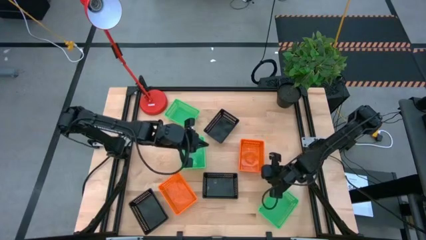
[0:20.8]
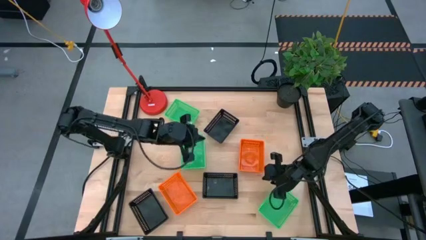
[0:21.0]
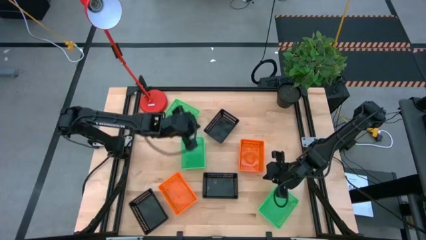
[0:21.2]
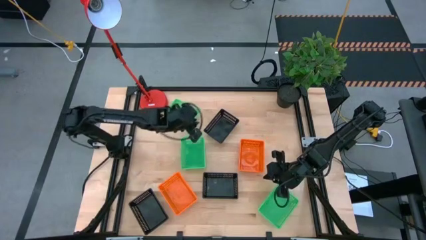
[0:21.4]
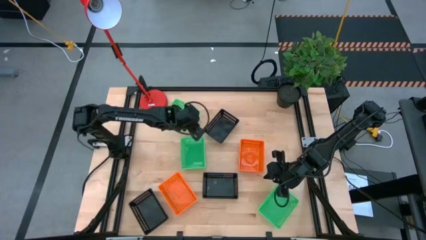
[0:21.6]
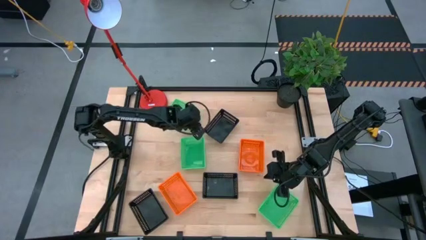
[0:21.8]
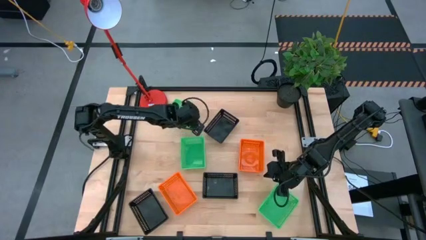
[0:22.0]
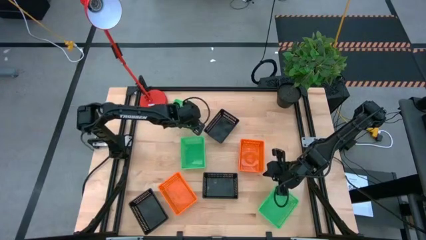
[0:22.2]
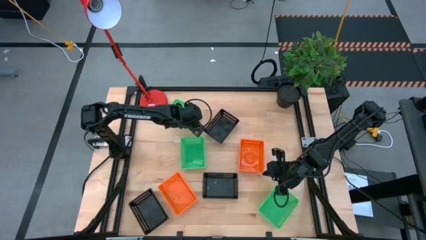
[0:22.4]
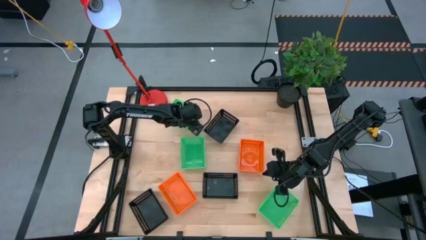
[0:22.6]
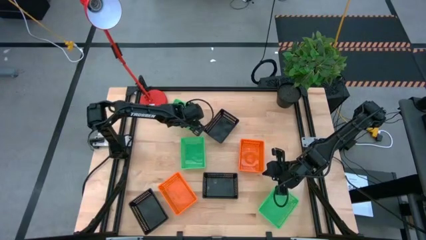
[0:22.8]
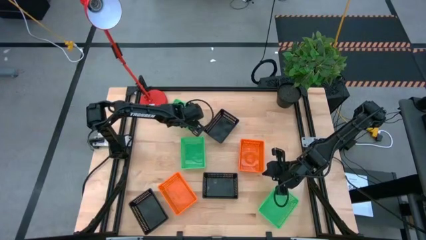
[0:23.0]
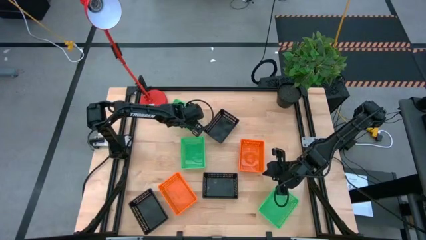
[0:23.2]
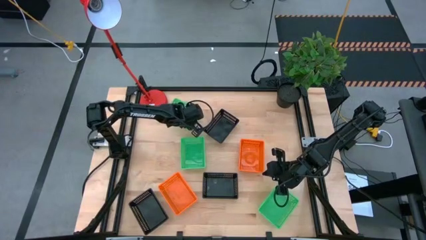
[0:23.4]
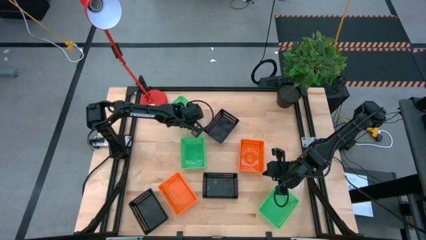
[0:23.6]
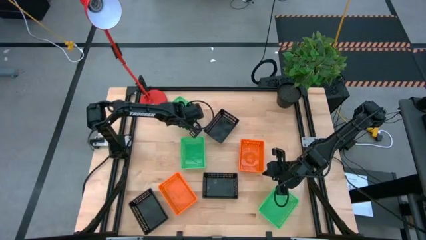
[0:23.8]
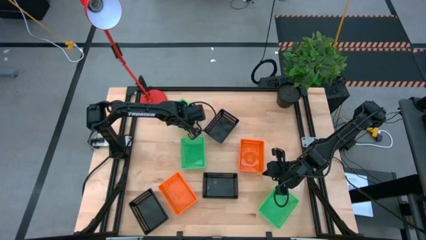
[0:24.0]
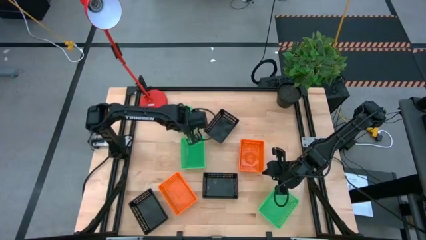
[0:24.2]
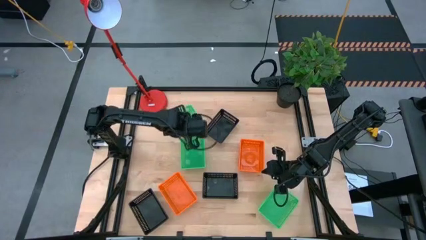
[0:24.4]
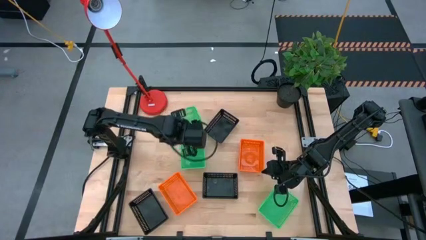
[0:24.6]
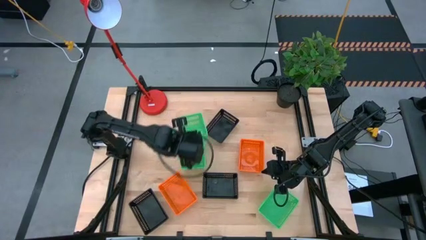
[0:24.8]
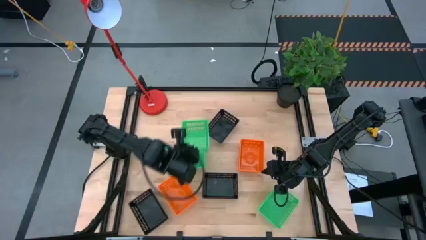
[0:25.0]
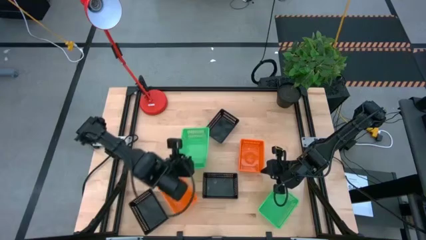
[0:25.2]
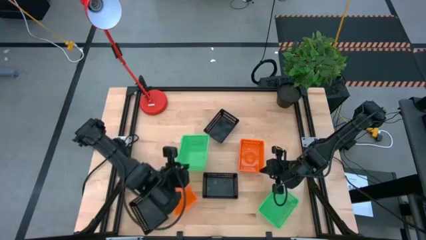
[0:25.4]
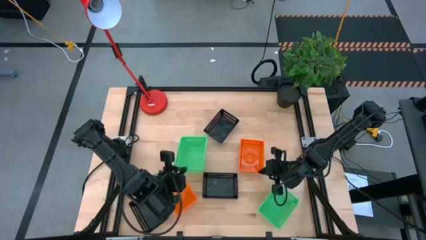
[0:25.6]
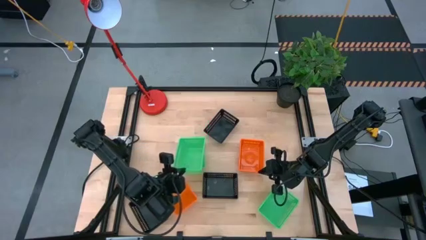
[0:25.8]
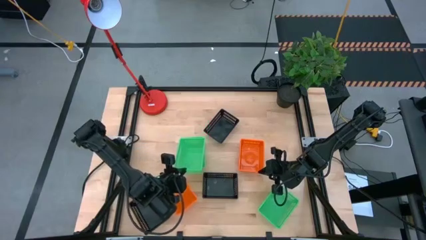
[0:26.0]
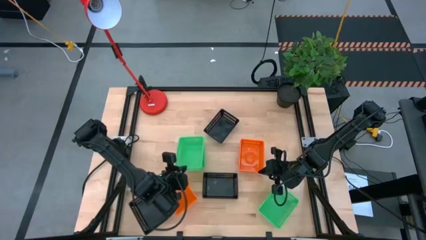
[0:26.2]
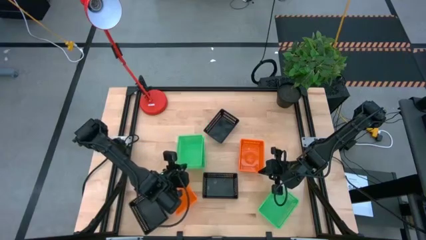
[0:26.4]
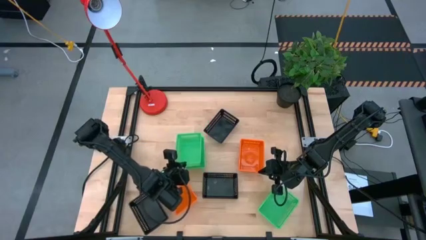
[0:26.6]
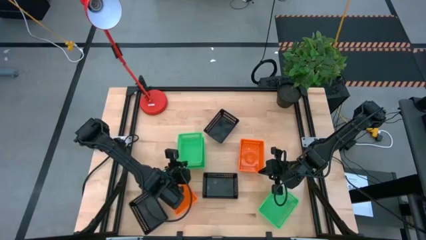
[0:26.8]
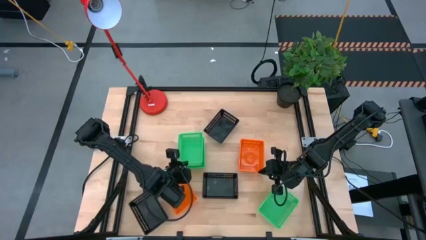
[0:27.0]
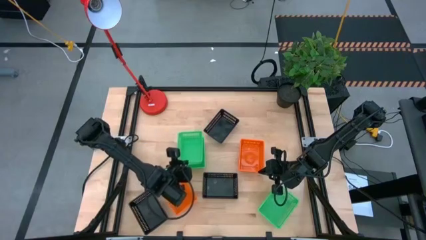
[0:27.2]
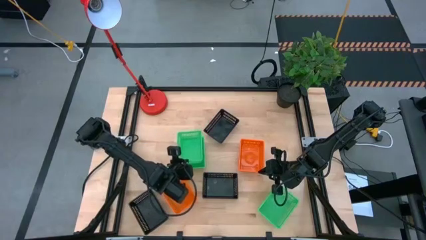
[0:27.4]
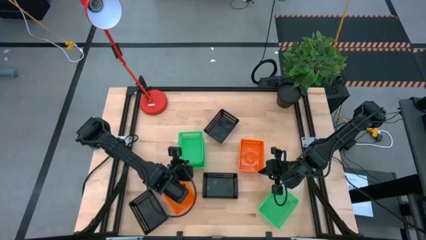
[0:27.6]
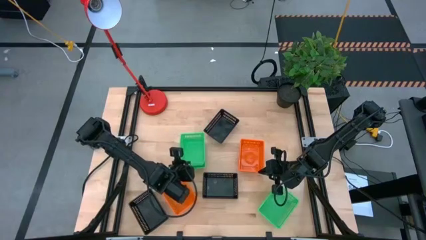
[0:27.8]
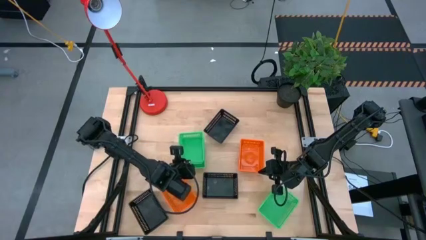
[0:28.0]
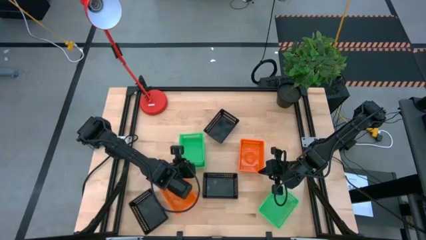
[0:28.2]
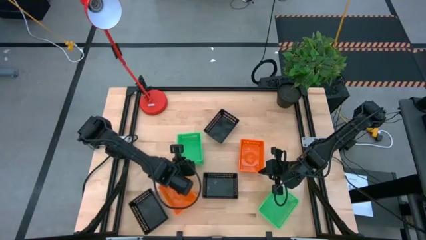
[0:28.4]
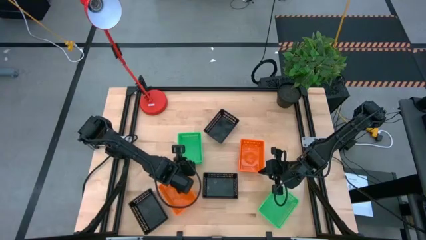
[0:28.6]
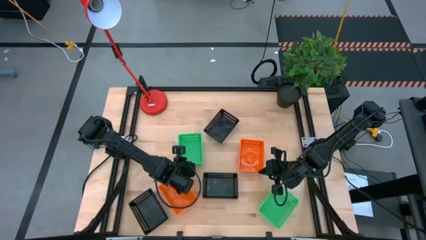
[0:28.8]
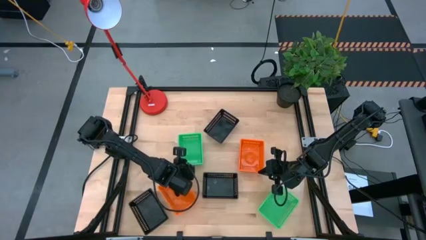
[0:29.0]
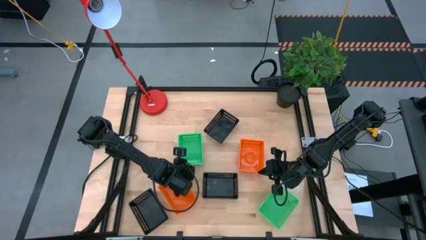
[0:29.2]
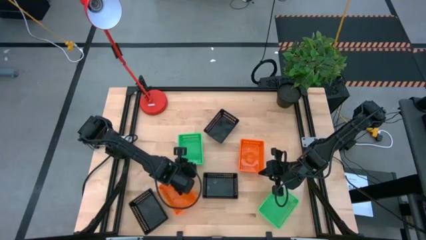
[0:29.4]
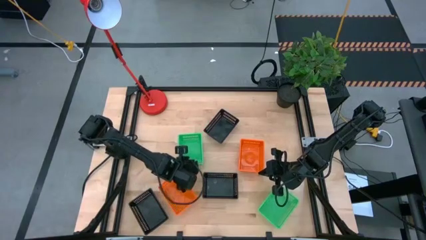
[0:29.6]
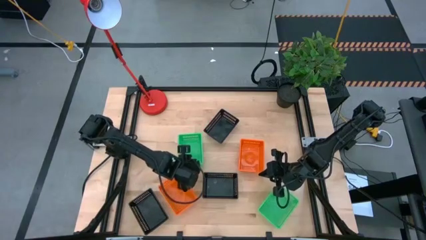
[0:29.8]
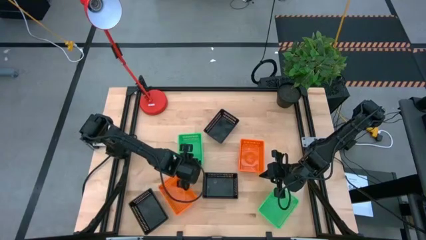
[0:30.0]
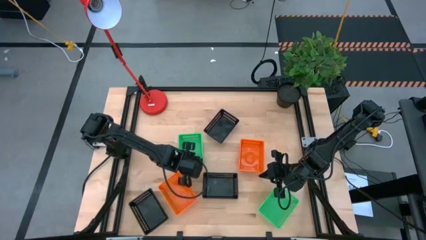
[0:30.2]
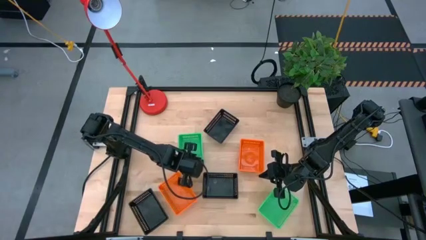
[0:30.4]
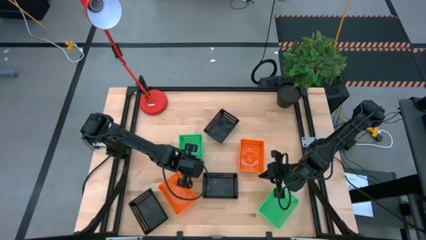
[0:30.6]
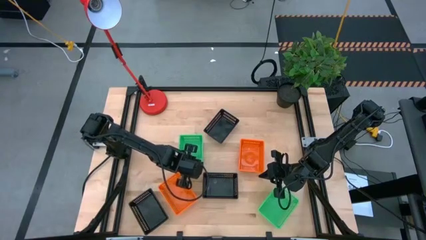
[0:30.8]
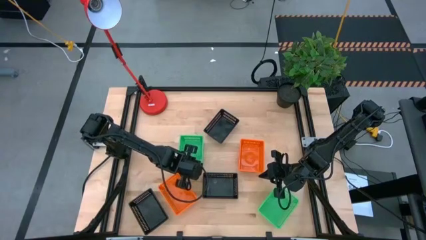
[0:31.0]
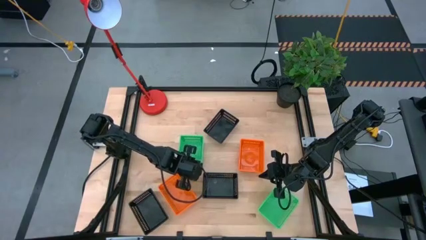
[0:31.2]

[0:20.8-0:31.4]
Stack the top green bin on top of the middle green bin

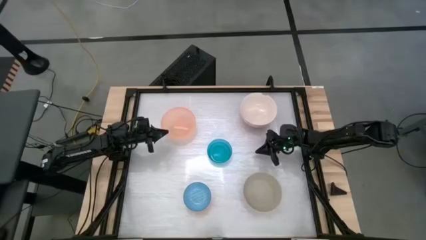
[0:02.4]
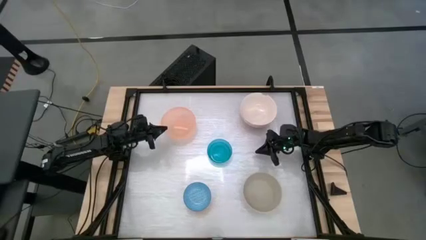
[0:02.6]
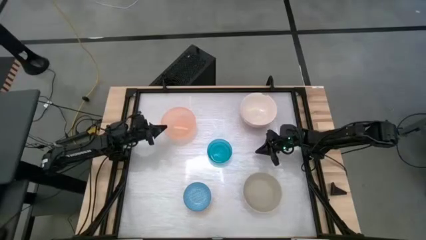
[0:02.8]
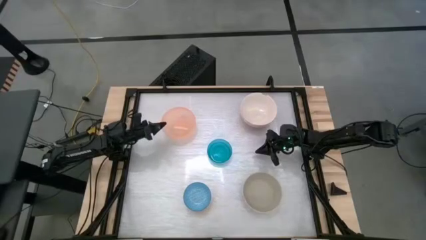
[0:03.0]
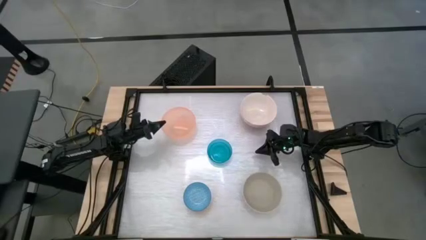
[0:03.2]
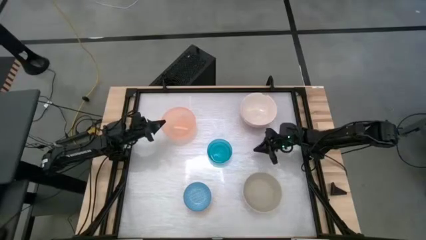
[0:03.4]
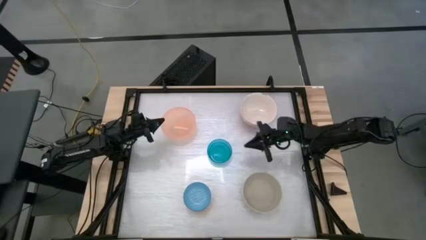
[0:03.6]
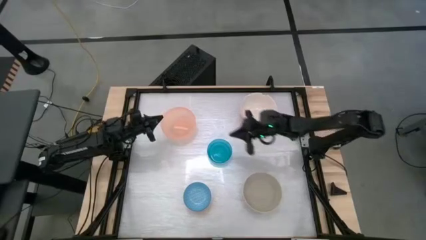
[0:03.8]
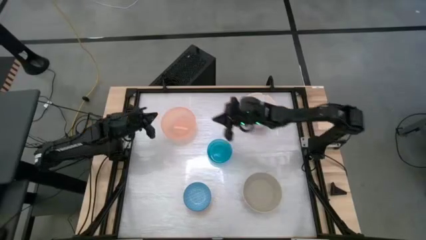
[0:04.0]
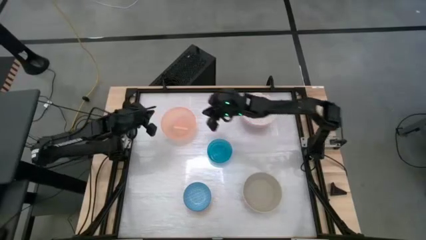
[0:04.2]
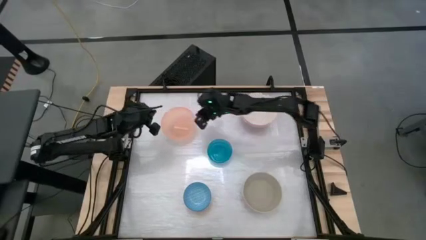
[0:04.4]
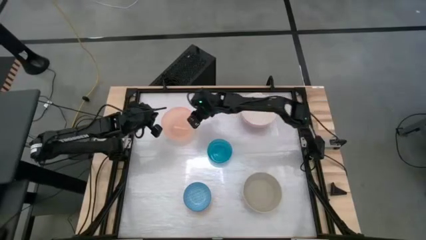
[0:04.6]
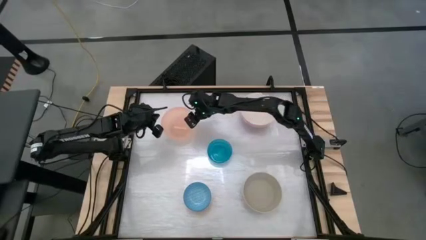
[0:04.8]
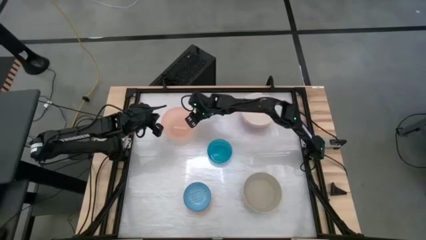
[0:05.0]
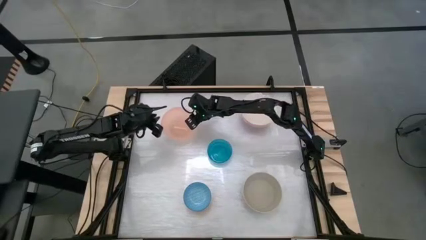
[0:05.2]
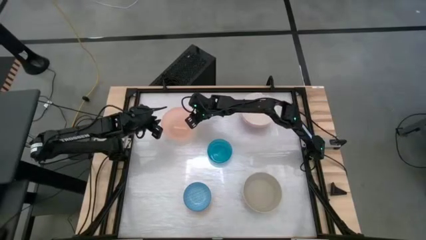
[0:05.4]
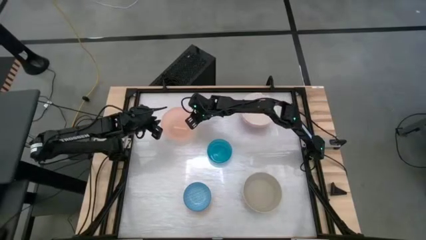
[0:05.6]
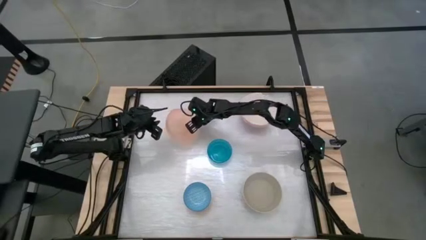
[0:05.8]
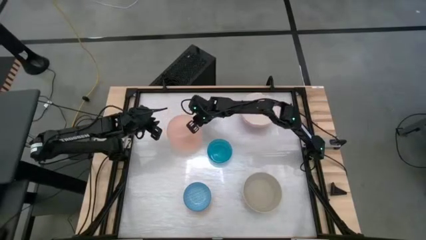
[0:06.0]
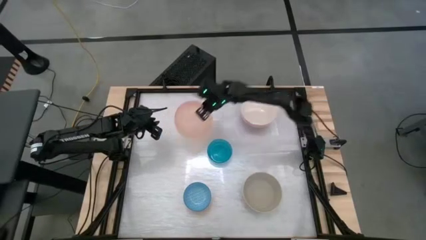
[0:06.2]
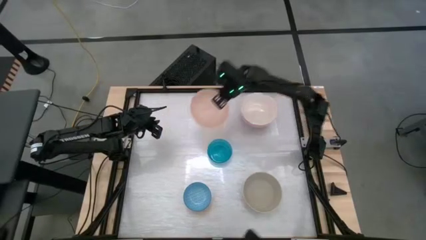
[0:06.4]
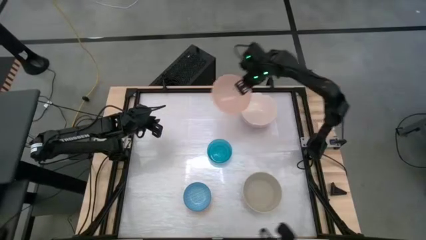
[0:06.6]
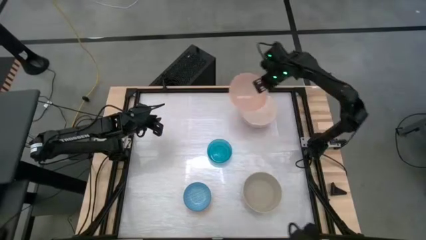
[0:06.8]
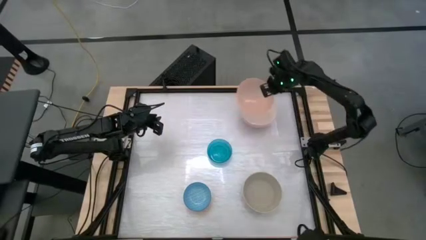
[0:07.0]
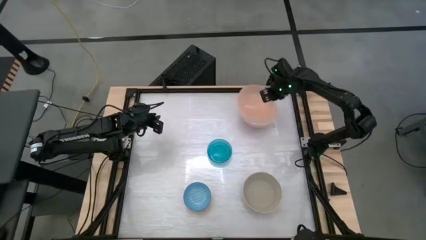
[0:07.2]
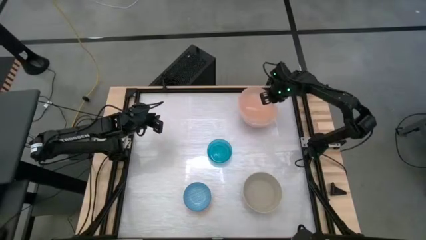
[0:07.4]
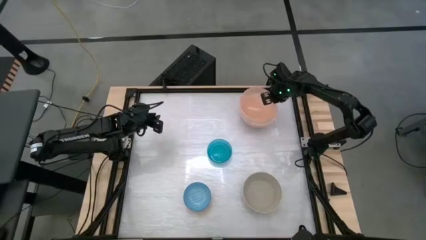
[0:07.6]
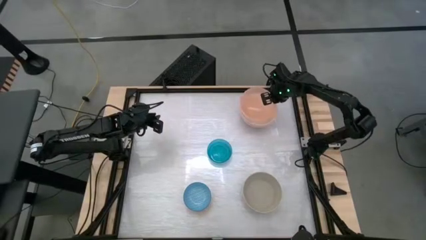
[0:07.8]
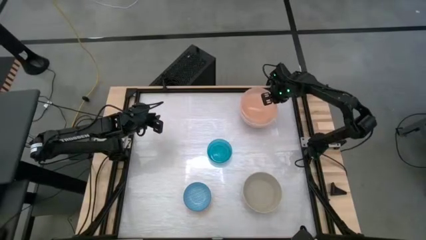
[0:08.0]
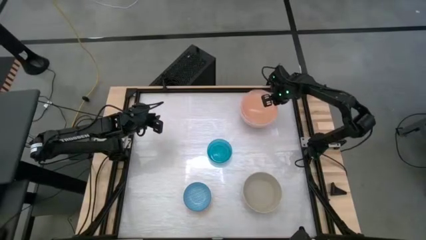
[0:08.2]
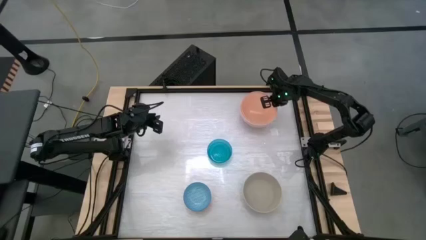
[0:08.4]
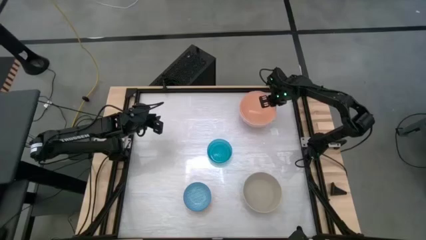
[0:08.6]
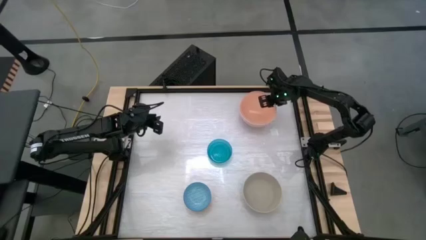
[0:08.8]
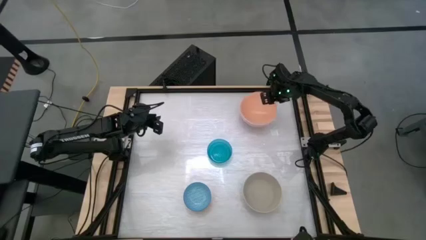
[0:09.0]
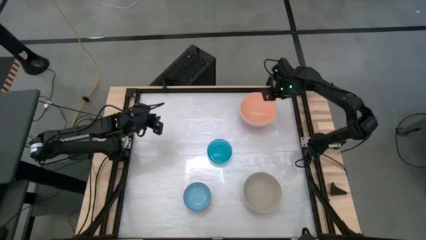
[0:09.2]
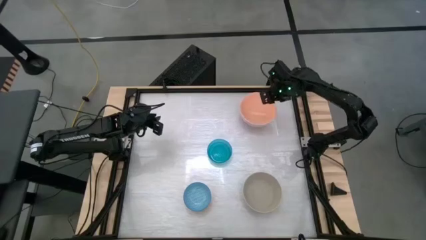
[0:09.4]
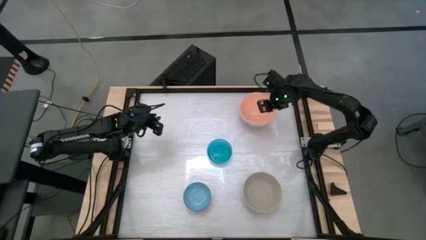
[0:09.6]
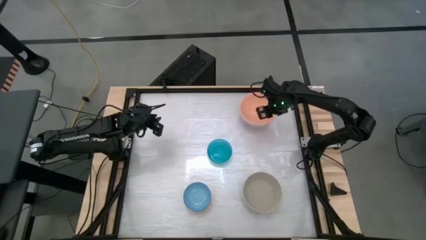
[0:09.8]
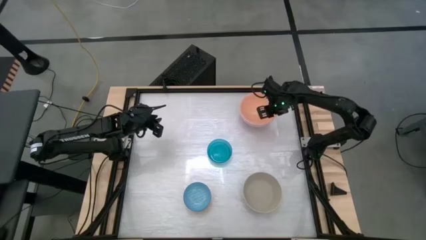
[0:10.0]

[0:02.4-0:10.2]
Stack the pink bowl on top of the white bowl
